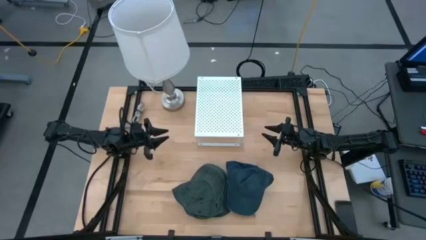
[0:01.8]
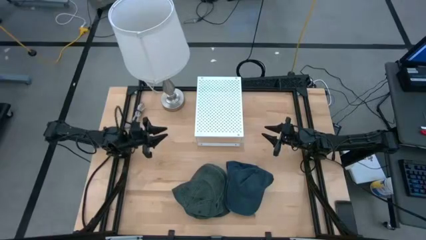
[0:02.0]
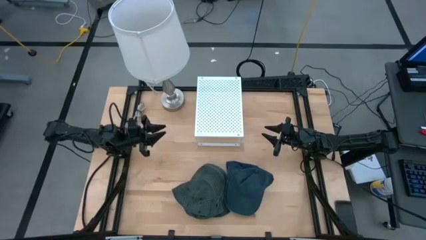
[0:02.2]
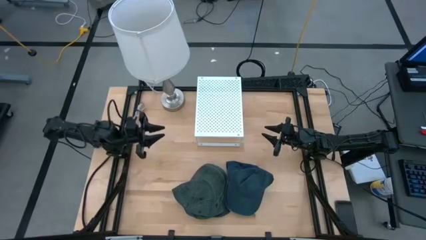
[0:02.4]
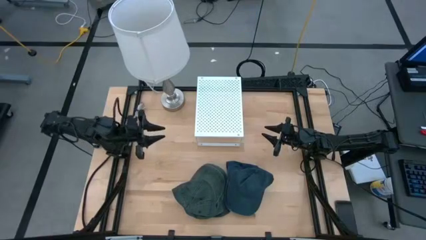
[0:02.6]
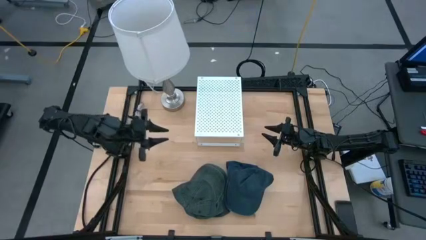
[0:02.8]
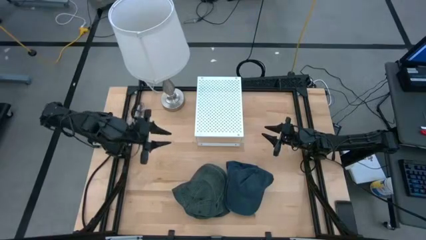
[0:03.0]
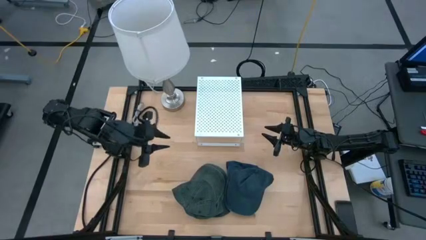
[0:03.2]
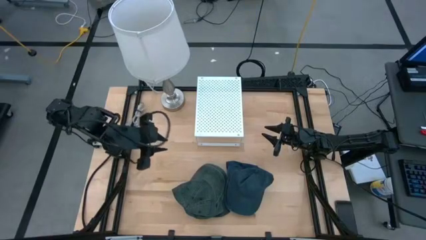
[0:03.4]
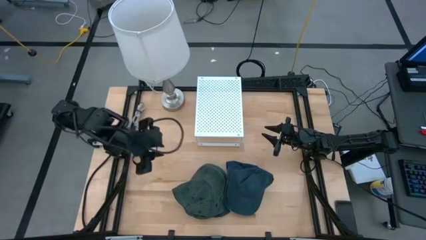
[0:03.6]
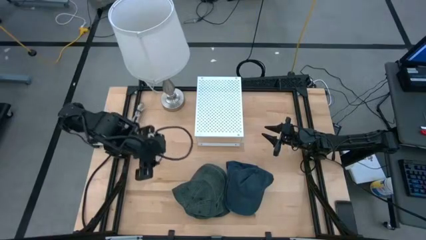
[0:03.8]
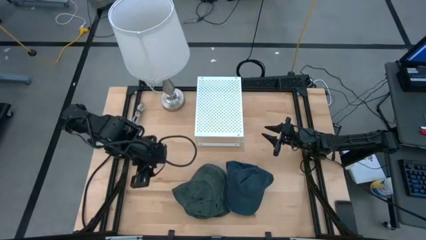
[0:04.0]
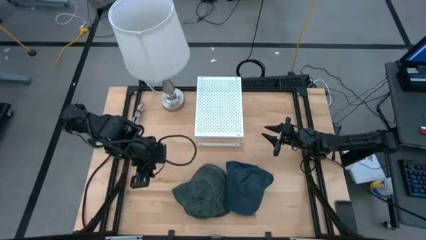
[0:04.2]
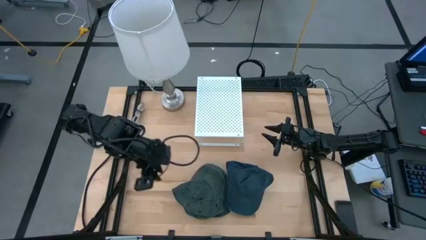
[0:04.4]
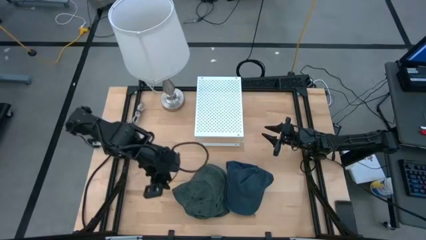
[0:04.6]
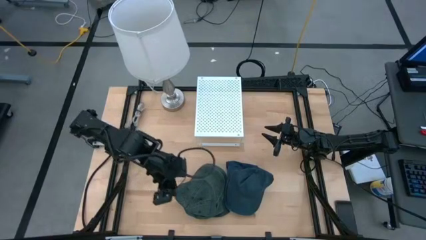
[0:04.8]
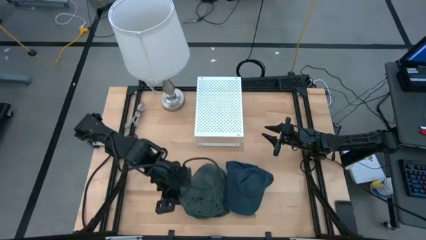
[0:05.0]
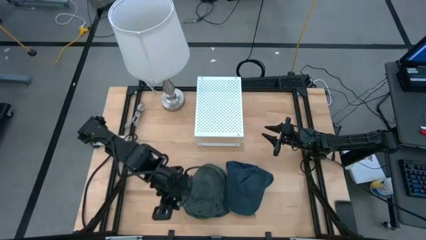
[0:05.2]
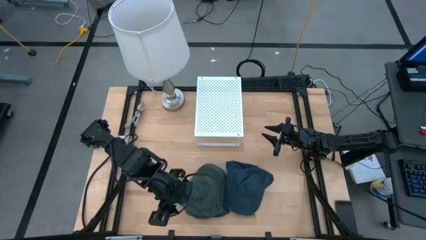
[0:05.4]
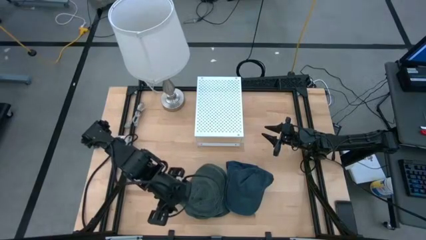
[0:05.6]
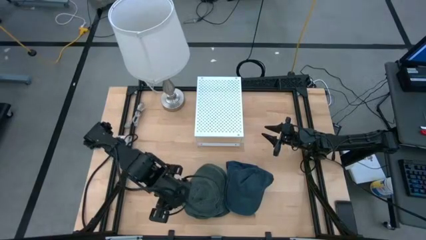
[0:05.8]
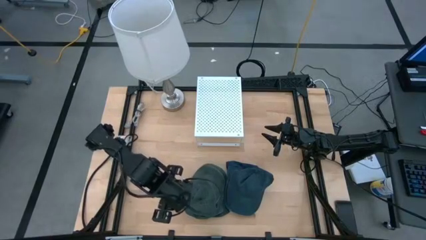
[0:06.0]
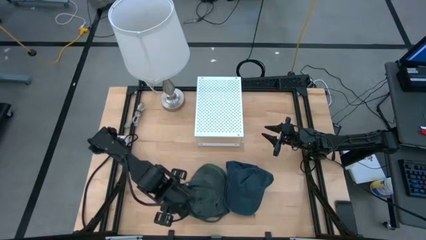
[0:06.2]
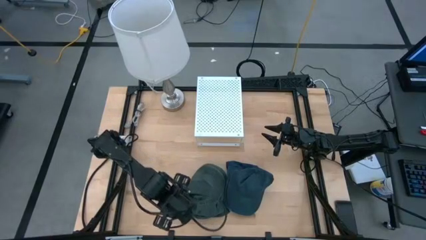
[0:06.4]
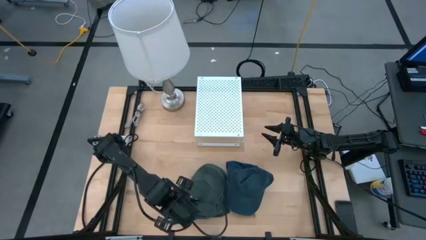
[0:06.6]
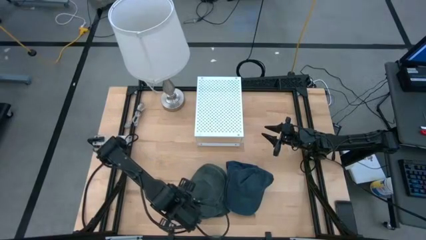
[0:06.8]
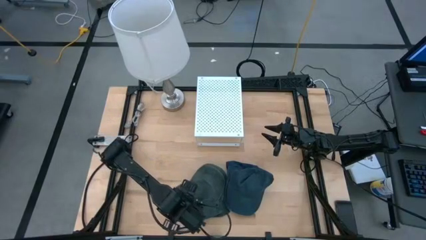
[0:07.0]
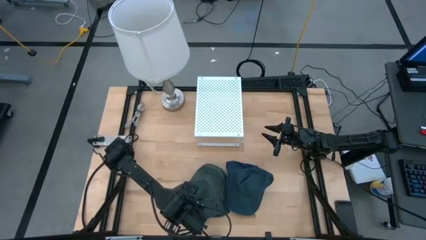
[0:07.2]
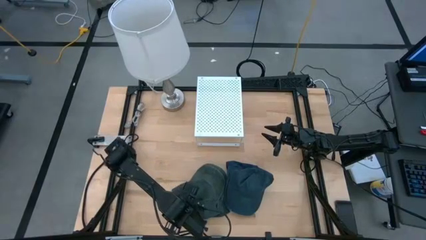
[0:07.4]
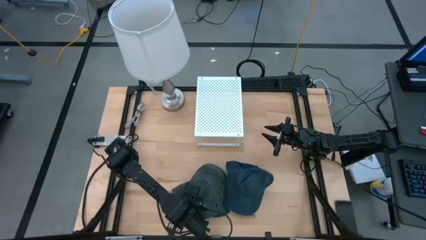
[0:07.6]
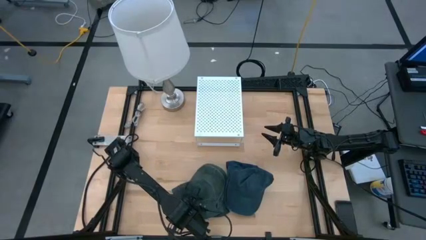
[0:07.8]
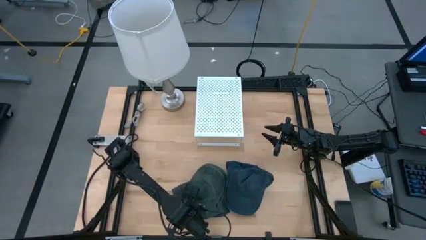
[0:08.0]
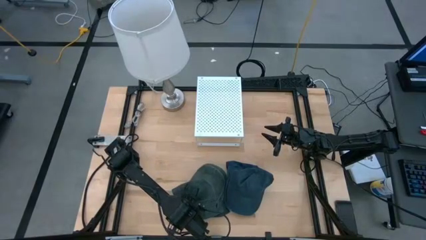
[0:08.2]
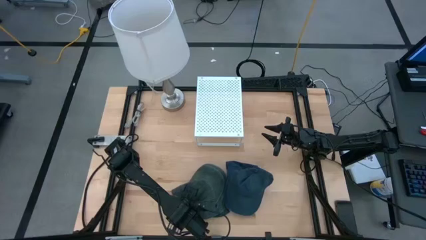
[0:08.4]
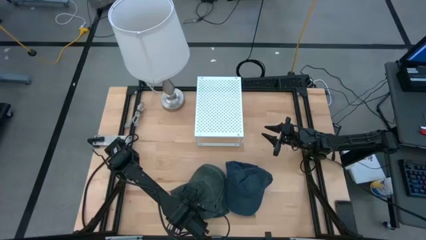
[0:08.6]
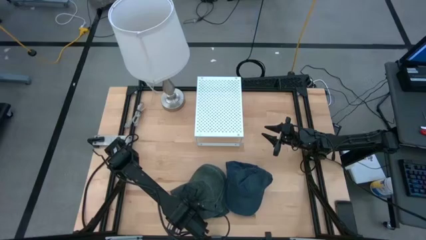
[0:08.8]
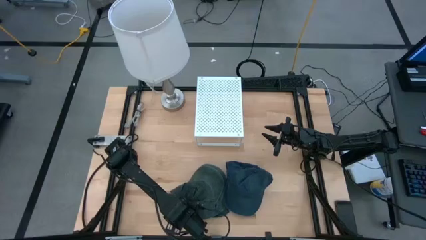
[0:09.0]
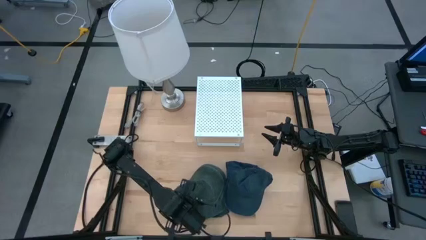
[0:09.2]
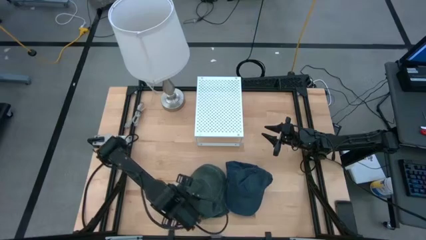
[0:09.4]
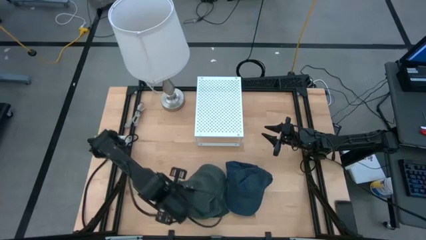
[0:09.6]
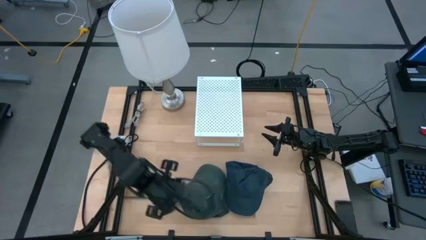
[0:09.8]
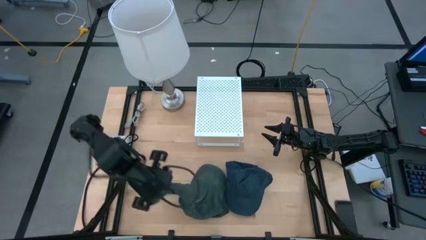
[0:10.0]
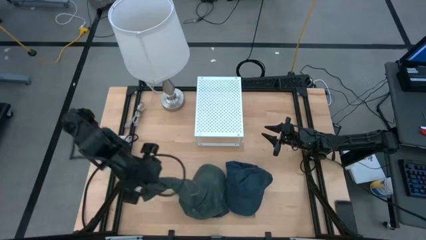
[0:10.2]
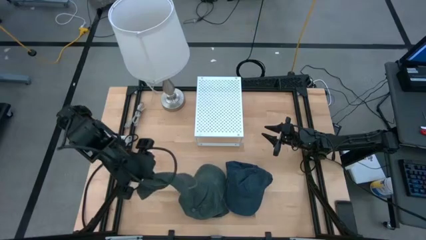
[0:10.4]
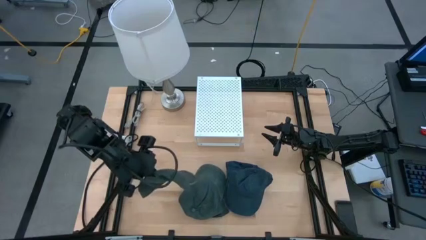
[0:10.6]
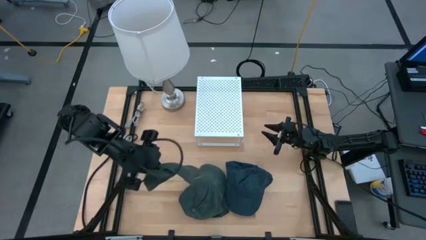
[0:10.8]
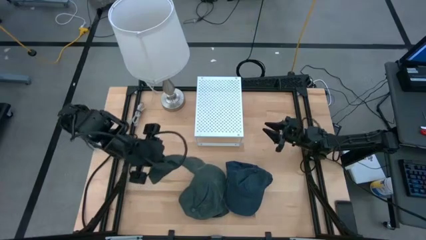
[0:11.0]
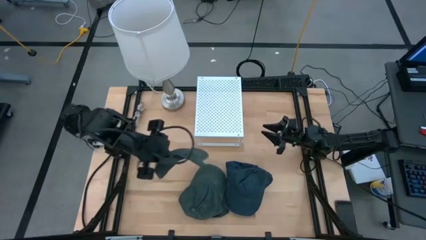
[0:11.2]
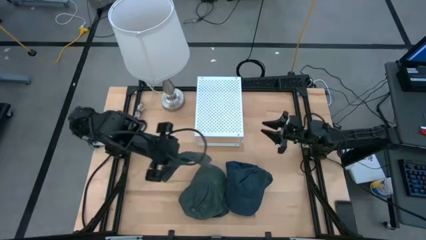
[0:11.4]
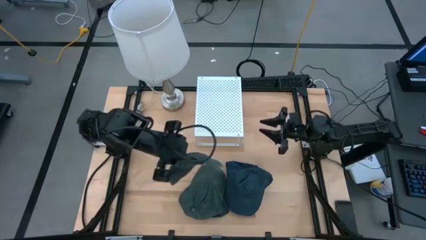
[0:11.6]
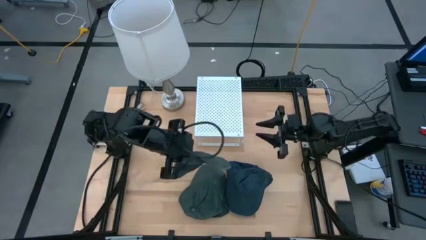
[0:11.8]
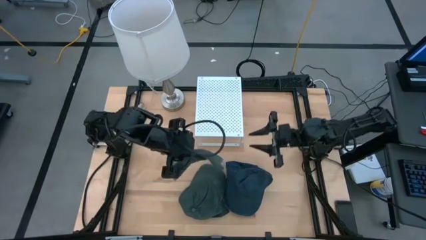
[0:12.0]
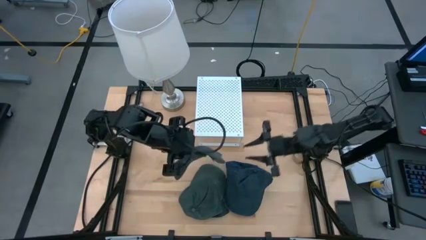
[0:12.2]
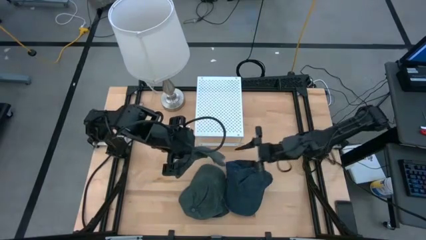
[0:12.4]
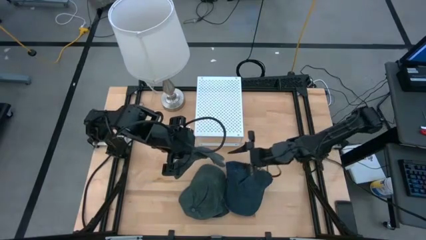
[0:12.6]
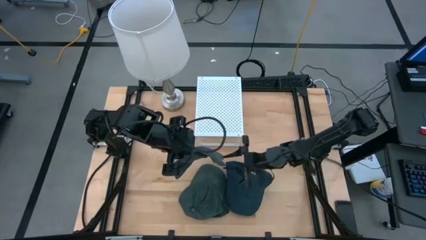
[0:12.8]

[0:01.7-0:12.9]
Task: Pick & Place hat
Put the black cap on the shelf

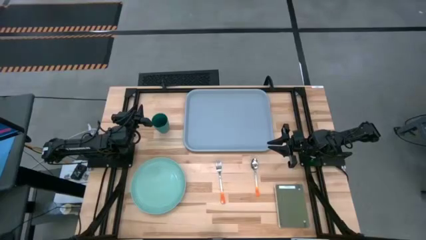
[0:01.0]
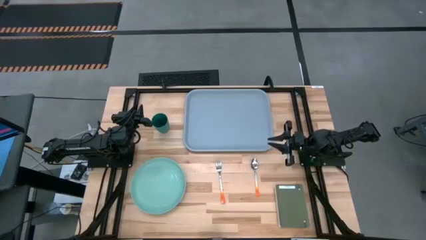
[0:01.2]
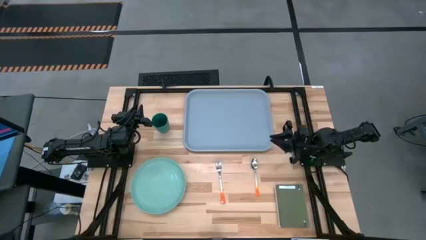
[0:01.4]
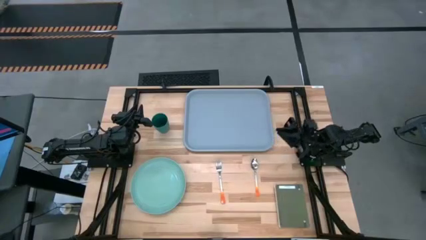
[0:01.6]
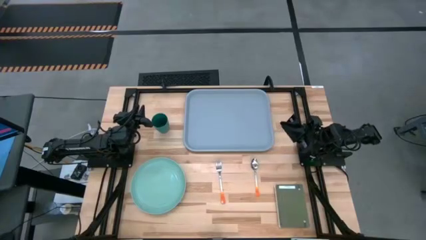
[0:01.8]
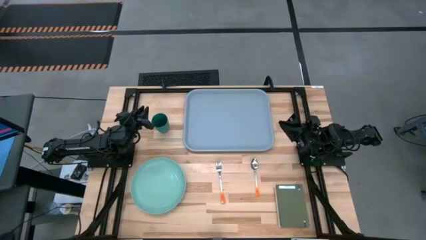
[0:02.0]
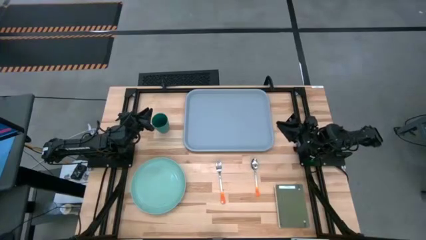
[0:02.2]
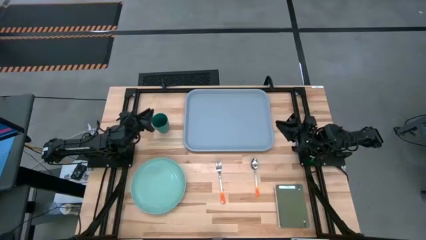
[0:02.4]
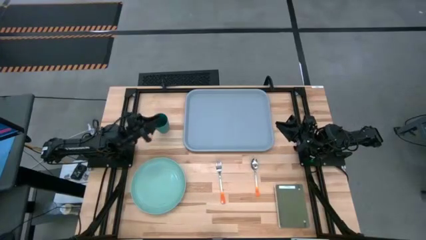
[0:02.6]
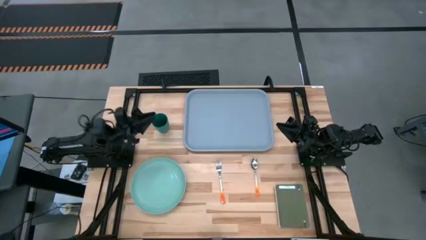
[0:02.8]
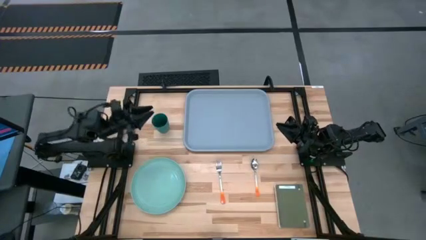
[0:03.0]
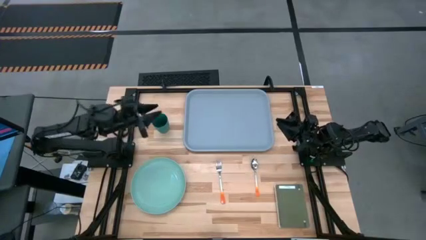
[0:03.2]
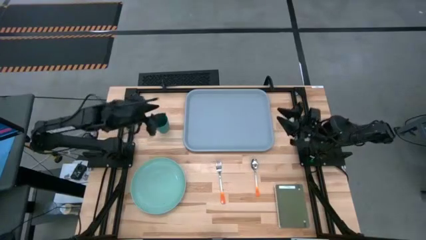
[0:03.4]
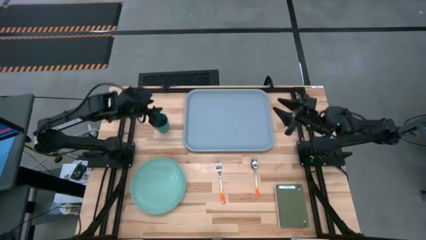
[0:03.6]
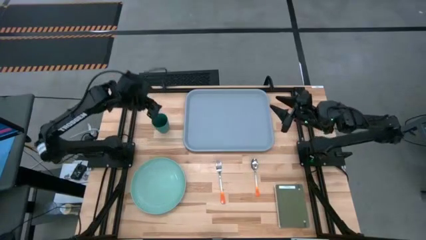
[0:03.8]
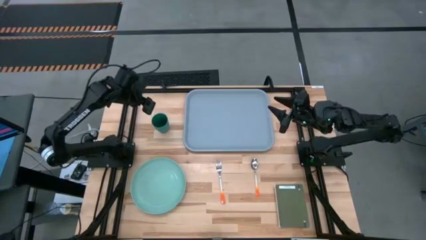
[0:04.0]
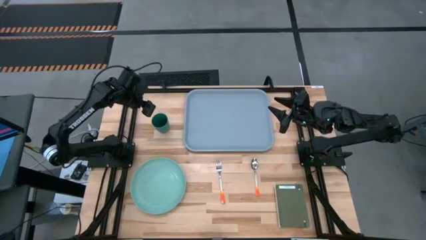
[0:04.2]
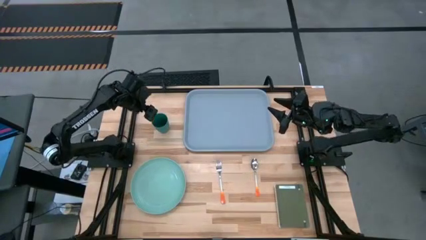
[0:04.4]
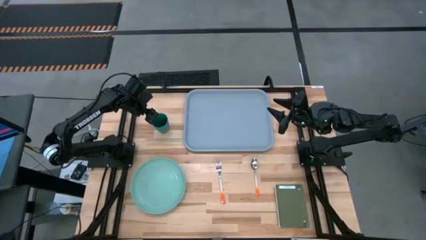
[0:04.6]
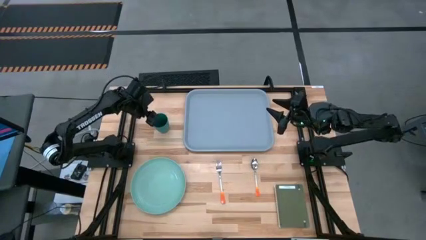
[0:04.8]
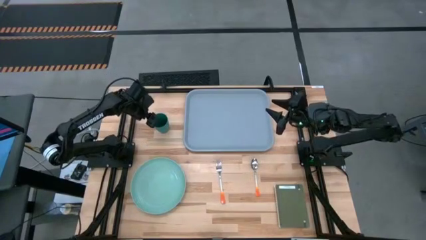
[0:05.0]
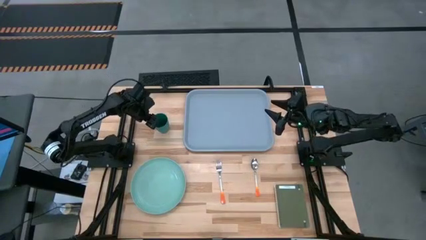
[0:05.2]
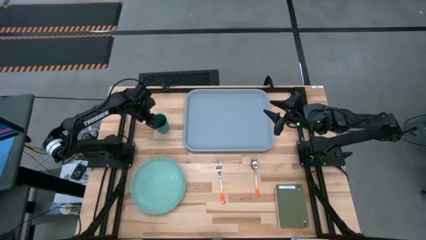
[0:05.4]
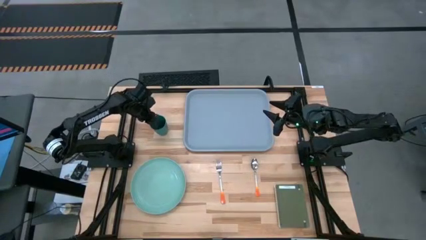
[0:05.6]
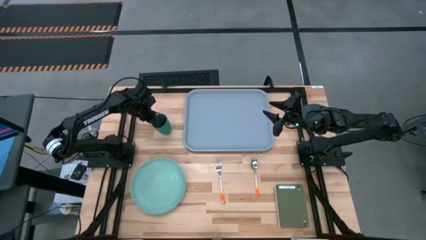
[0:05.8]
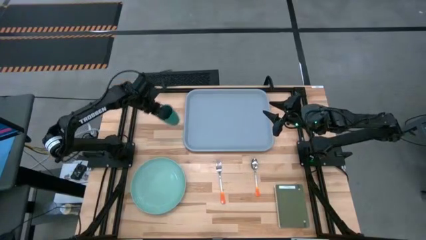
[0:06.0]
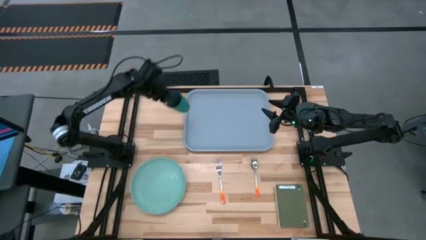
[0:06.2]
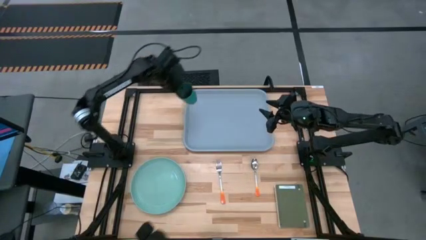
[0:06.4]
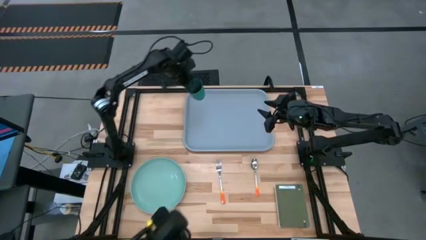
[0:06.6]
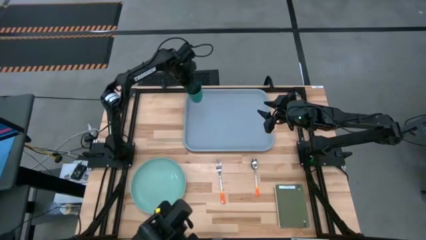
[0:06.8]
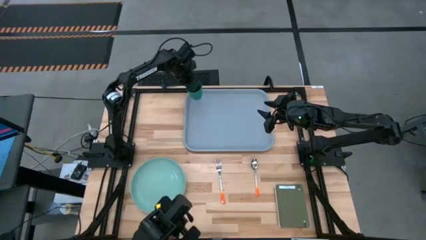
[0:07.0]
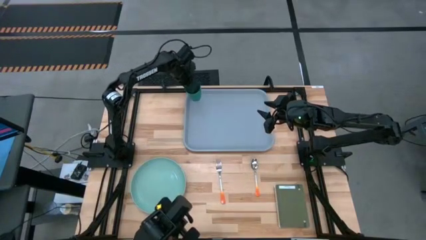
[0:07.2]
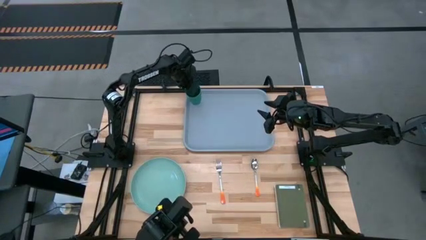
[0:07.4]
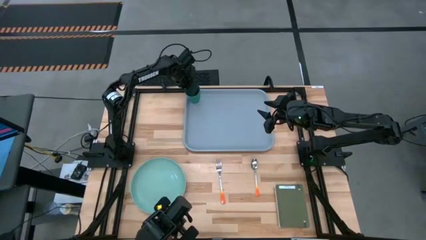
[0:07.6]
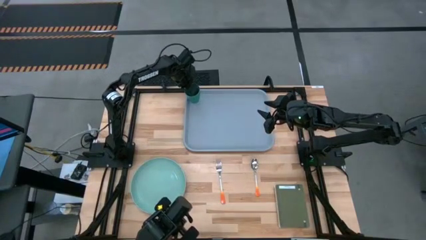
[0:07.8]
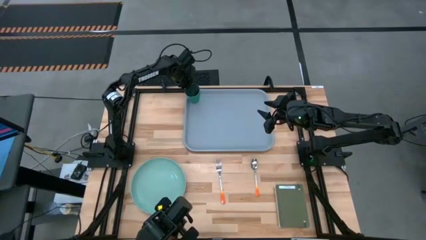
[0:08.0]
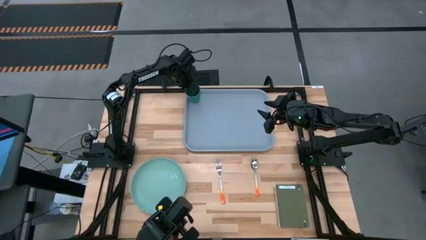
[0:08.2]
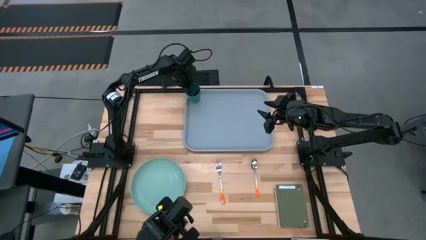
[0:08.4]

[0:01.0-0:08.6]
Task: Pick and place plate/cup/fork/spoon on tray
Put the dark green cup on the gray tray
